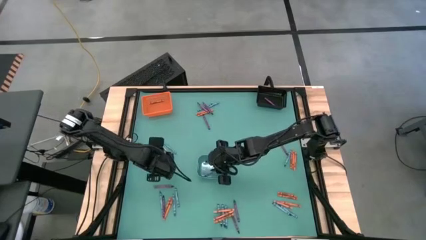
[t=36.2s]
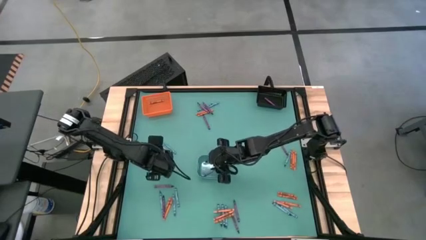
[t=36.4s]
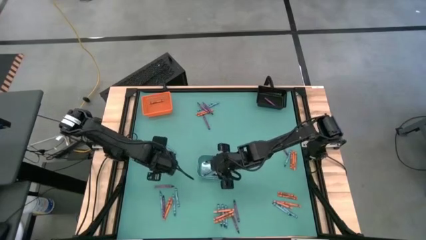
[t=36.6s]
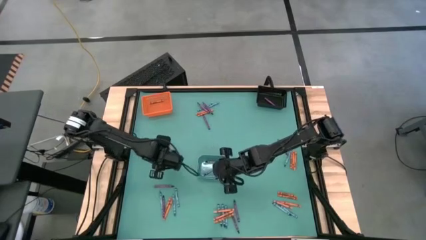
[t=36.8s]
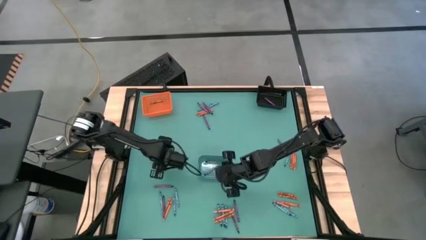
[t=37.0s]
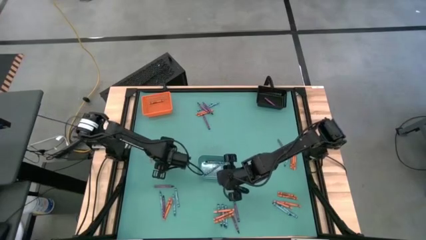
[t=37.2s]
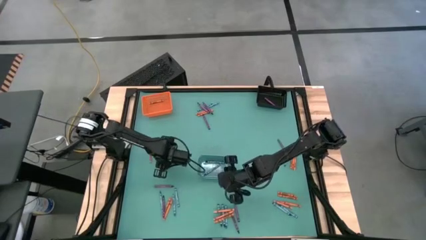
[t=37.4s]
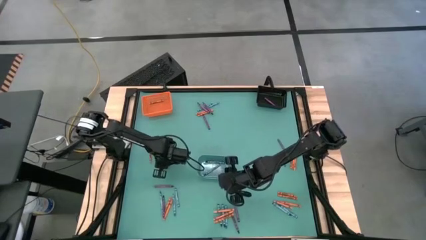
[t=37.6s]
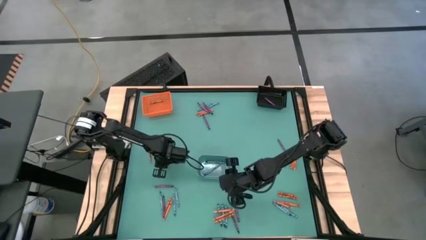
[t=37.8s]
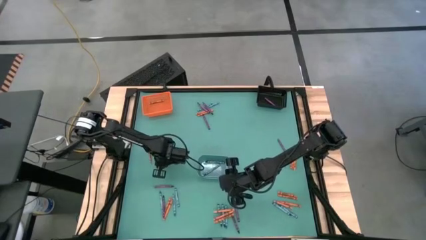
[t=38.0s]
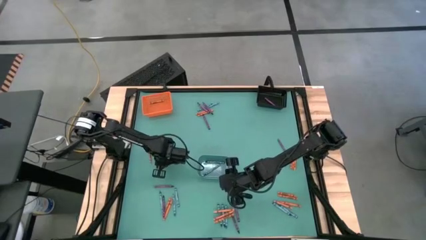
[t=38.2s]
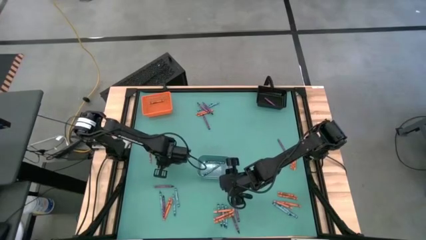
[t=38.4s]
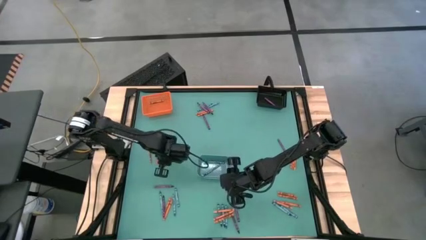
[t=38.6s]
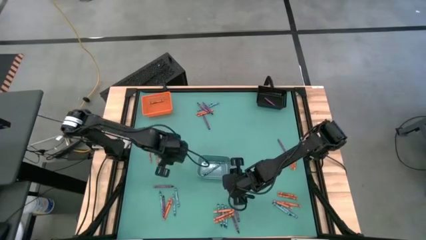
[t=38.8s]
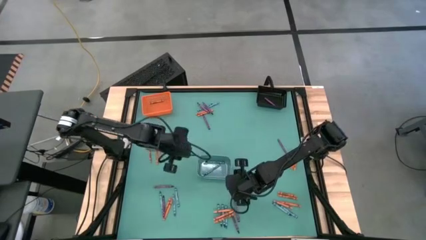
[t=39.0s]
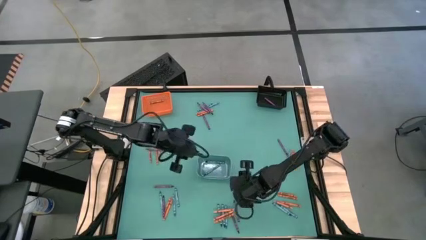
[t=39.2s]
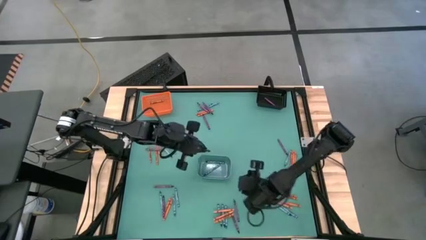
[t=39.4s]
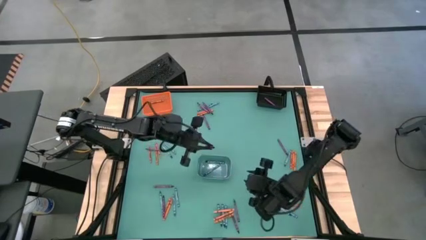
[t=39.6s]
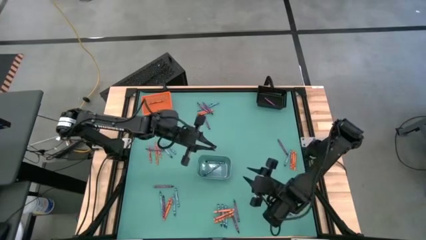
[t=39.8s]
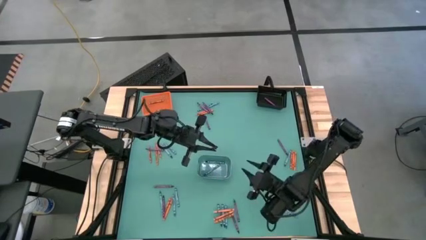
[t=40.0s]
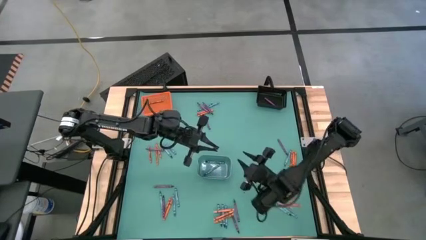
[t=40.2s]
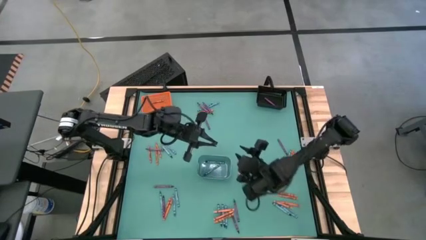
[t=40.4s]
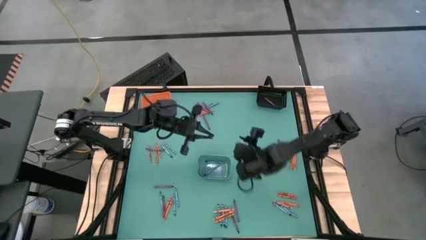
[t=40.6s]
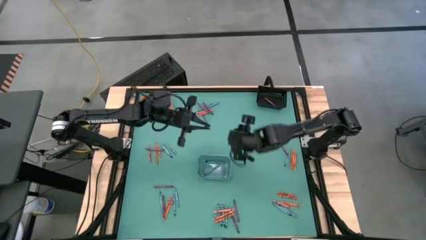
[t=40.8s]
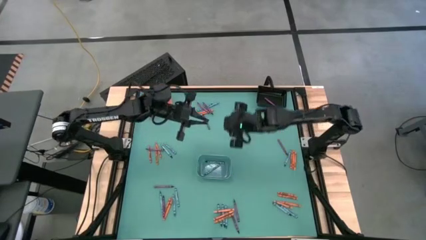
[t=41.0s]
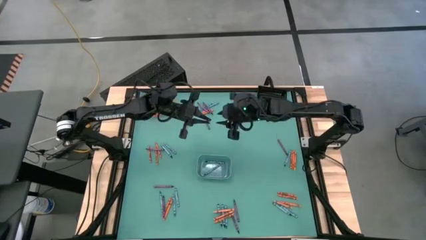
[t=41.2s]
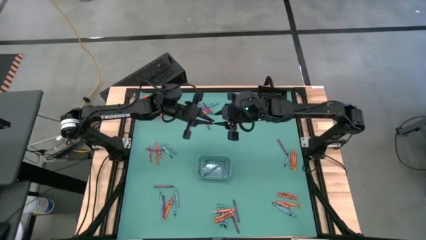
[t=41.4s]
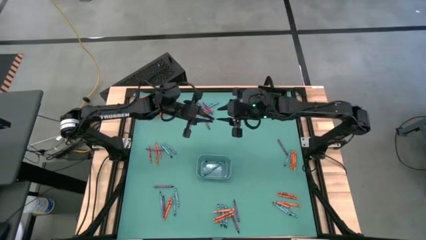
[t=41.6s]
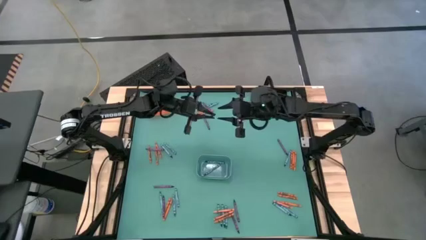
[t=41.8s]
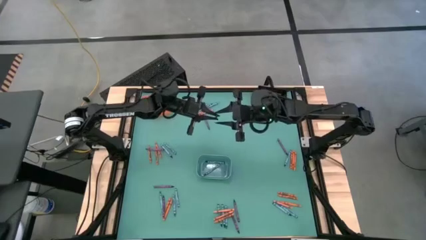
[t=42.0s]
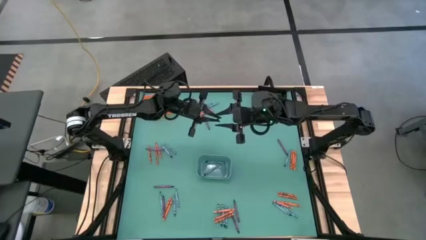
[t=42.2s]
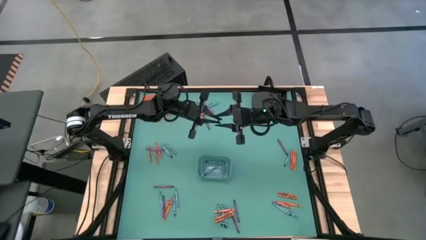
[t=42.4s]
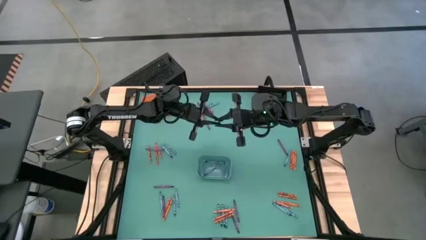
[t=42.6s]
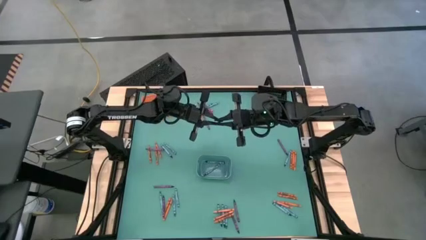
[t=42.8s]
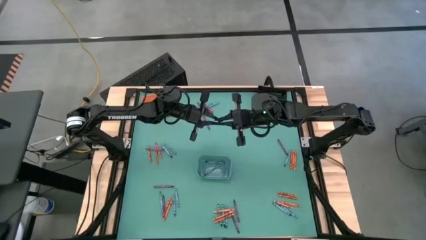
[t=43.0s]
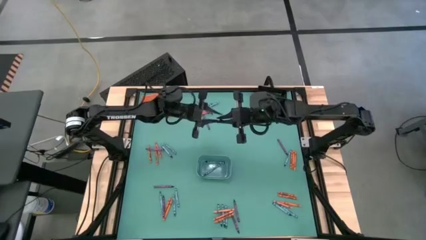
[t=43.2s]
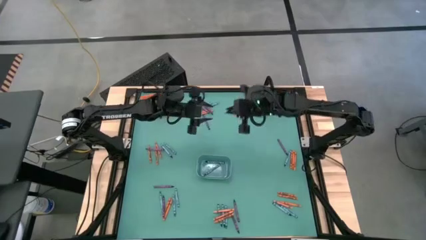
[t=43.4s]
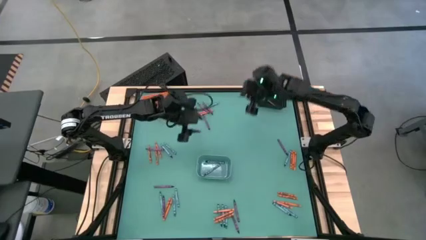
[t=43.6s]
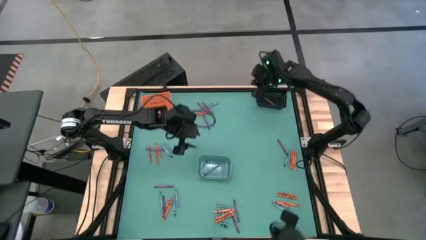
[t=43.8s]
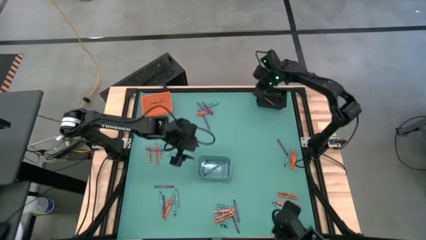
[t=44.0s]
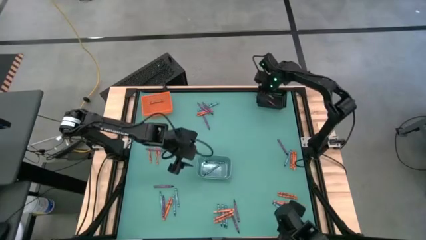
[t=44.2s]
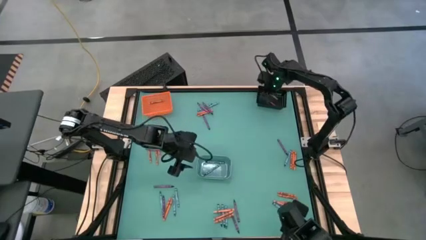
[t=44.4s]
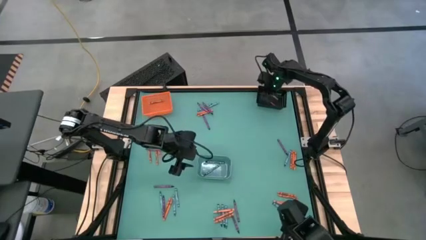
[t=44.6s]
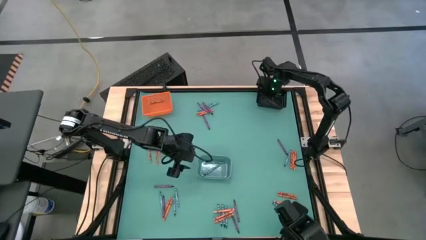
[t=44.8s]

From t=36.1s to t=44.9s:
Task: Sort crayons
Put the violet crayon into the black bin

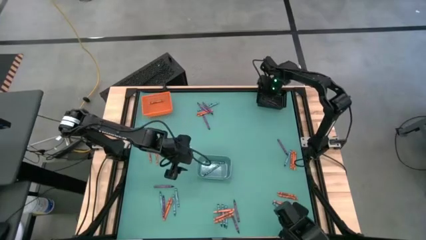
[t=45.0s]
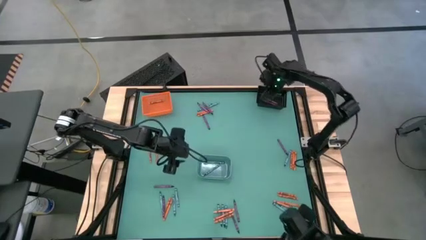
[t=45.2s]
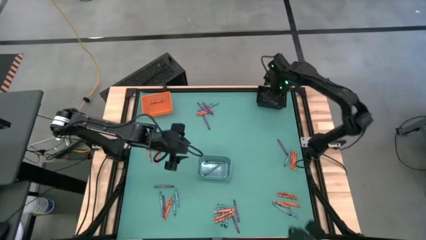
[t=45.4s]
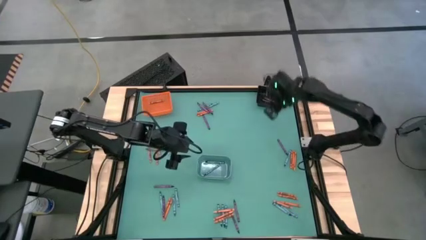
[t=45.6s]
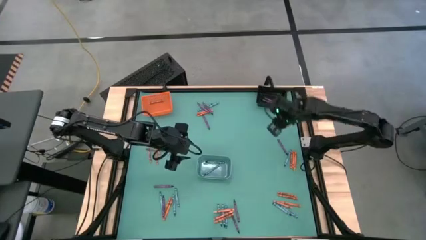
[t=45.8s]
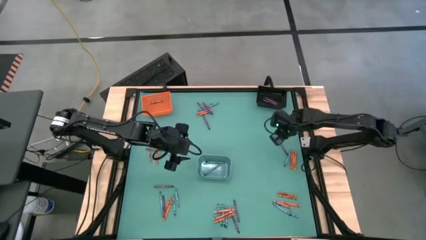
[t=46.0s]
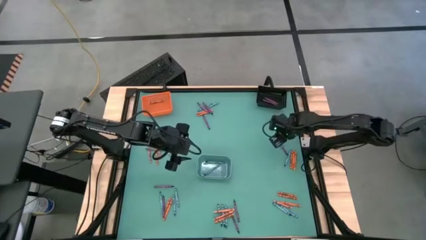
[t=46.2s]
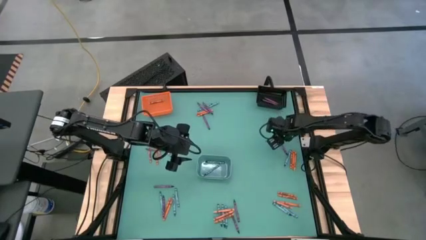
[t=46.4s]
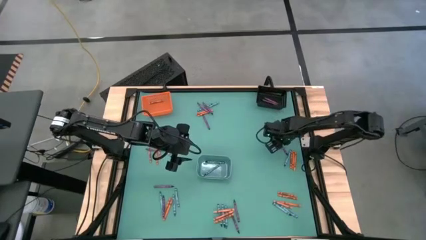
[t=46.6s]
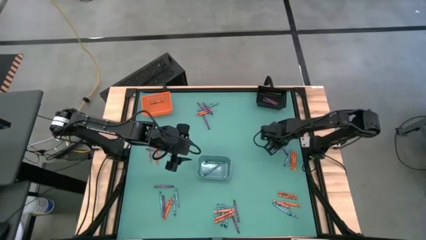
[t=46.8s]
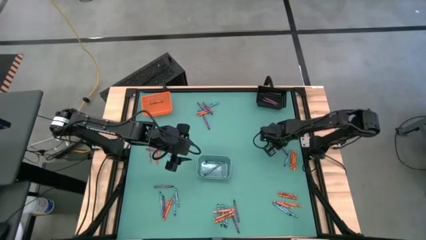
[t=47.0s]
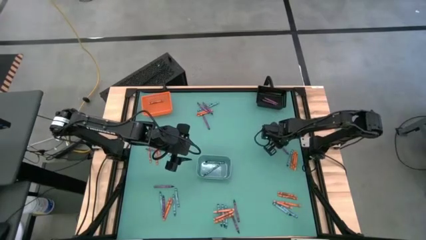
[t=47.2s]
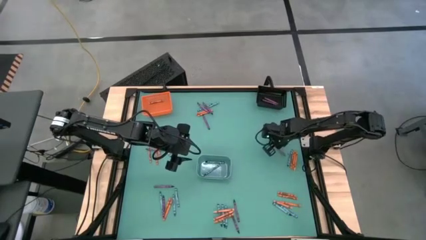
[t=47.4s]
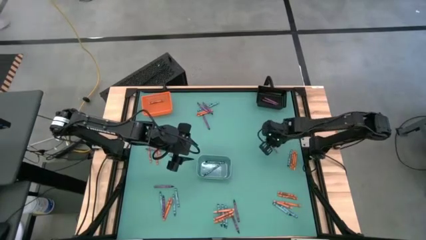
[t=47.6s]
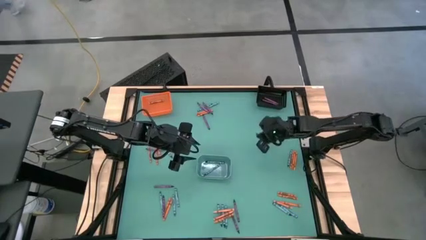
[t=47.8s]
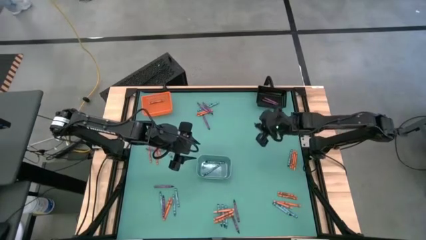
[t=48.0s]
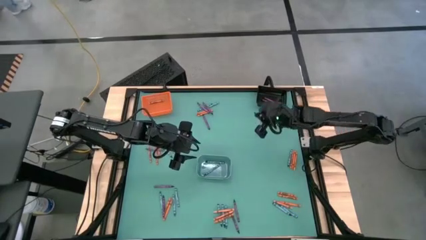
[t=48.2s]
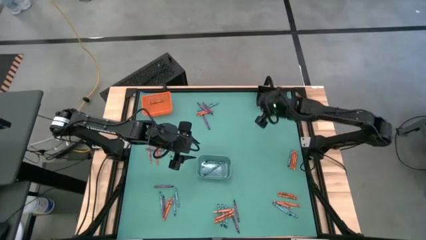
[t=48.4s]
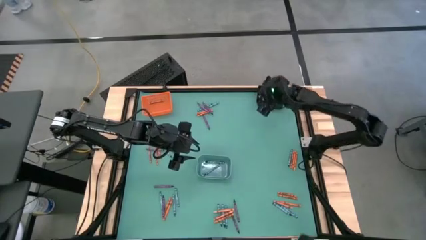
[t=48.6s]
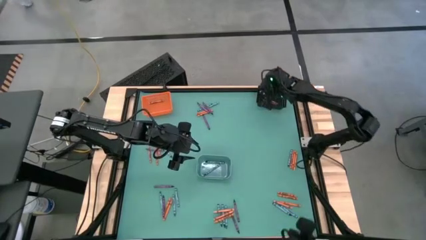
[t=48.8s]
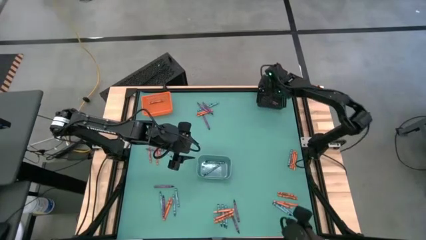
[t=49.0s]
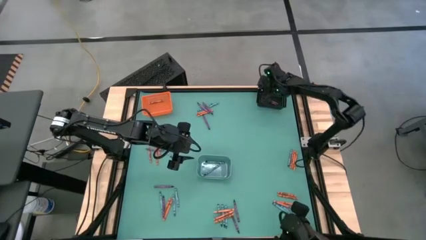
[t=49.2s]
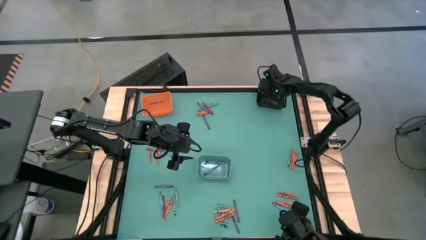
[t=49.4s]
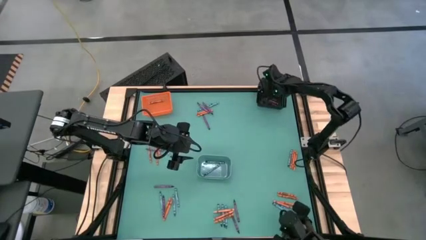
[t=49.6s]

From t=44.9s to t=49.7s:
Put the violet crayon into the black bin

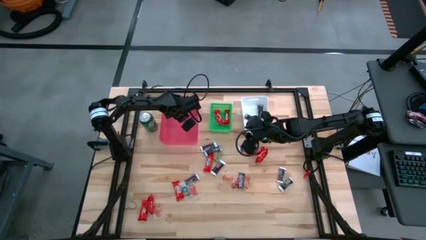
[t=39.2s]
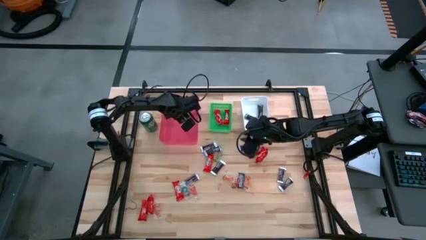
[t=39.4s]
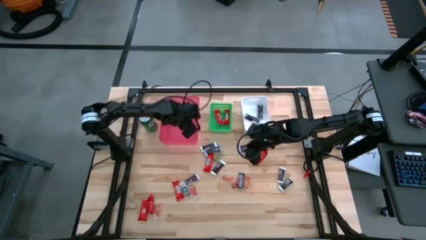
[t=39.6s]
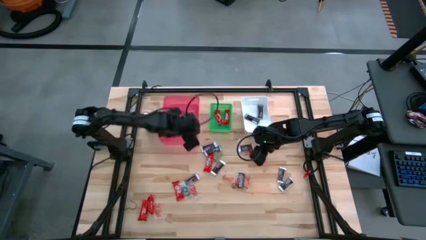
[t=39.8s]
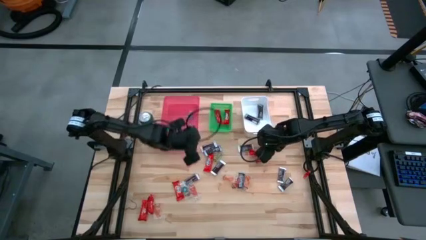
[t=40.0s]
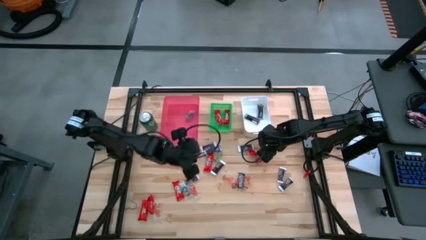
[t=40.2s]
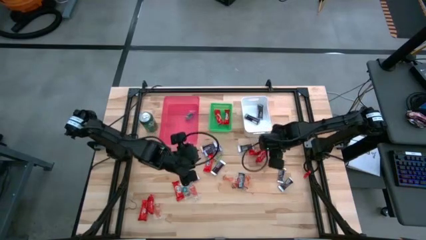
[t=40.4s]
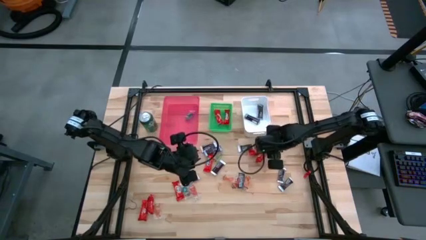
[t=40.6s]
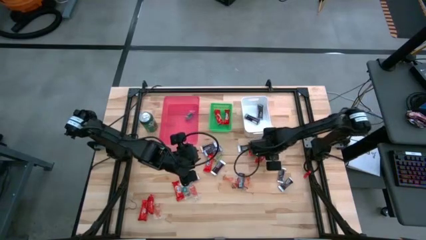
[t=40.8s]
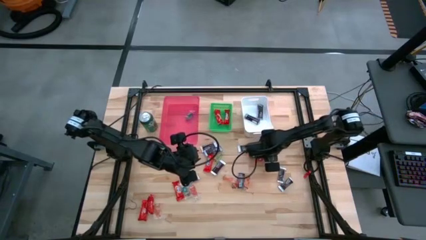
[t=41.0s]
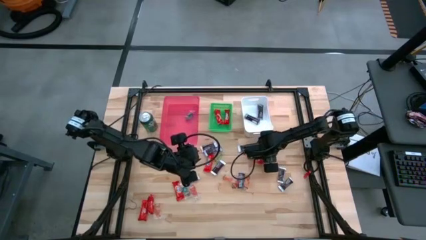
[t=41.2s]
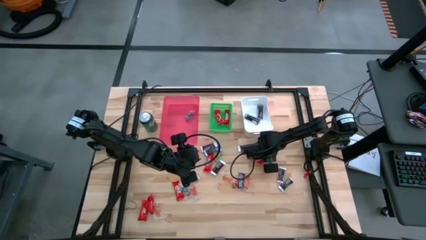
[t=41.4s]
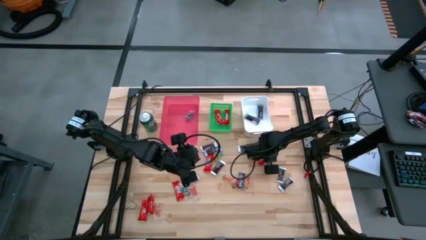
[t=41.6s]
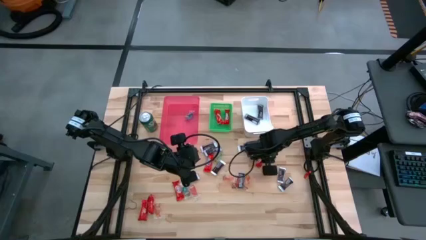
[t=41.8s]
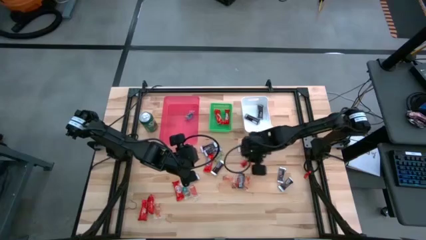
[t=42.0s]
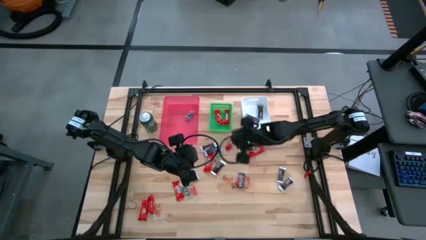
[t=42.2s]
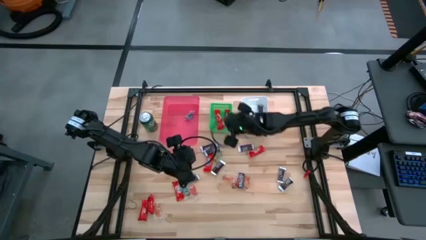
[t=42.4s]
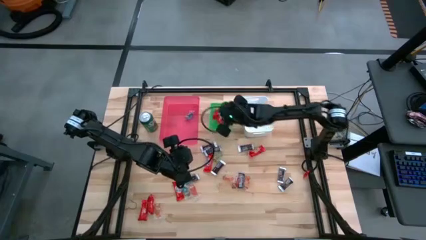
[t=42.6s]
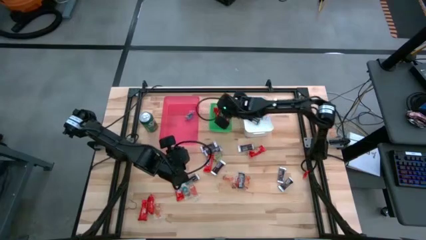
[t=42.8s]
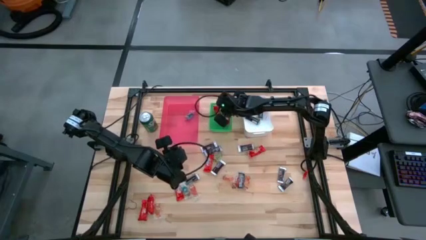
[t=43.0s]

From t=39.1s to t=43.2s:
Task: Sort candy
Put the red chocolate into the green bin
